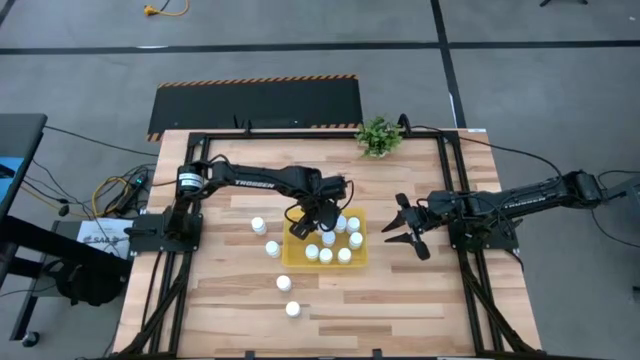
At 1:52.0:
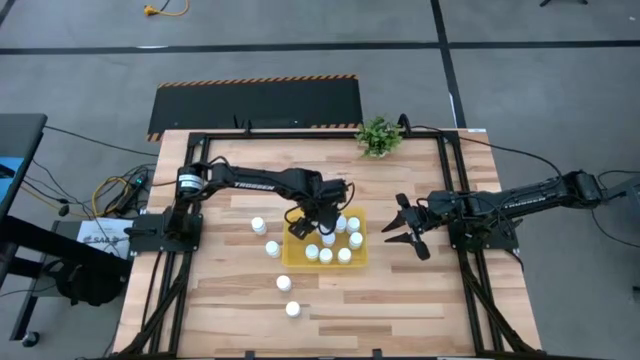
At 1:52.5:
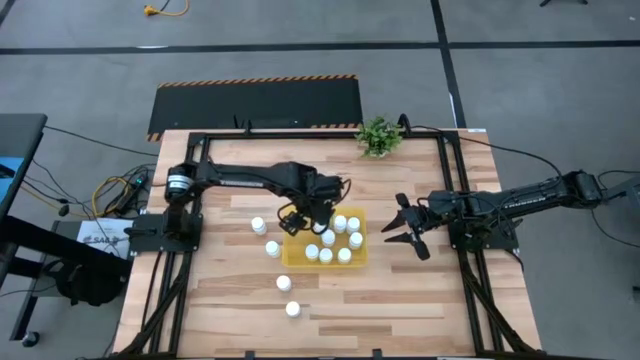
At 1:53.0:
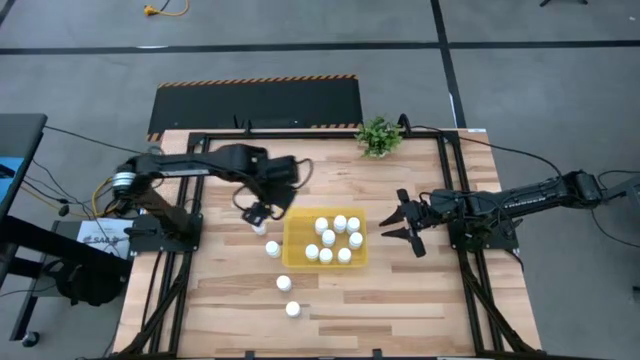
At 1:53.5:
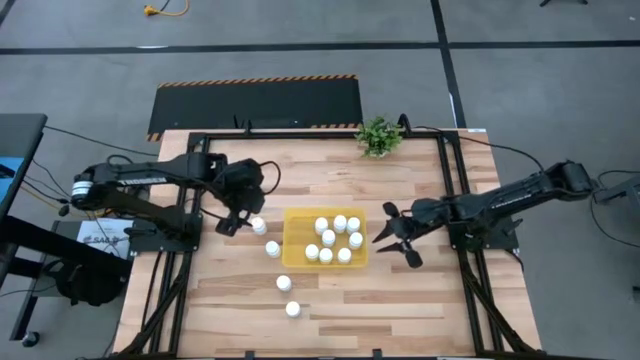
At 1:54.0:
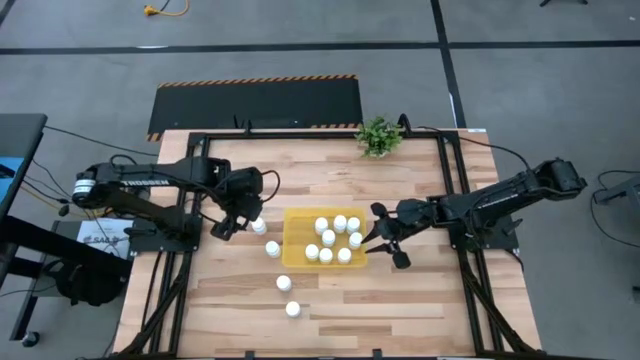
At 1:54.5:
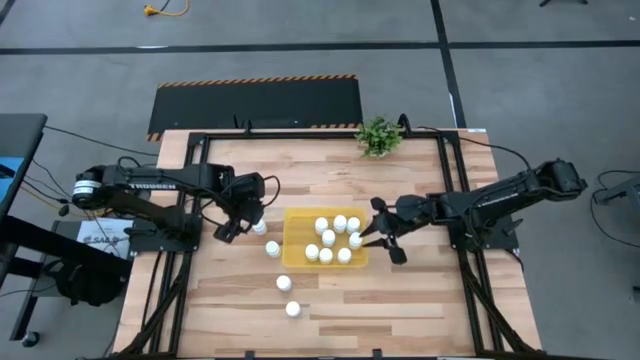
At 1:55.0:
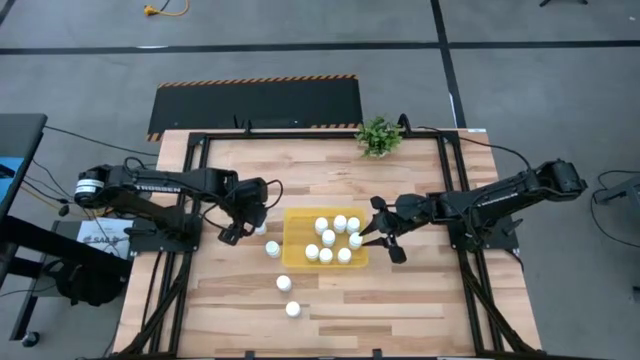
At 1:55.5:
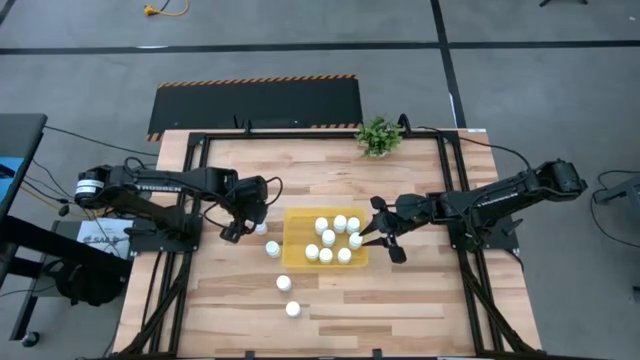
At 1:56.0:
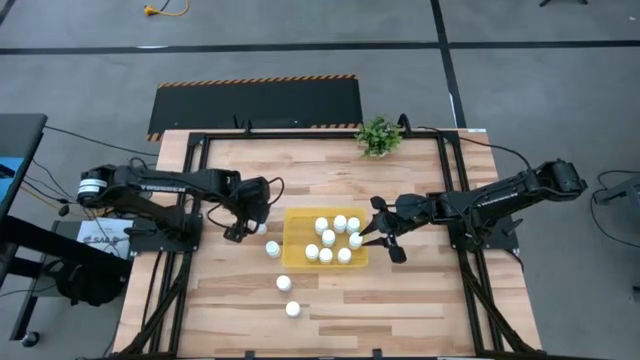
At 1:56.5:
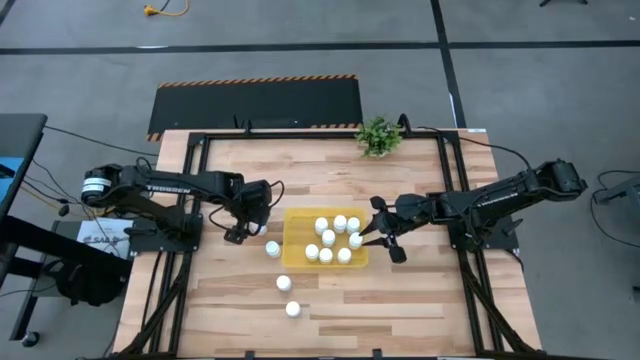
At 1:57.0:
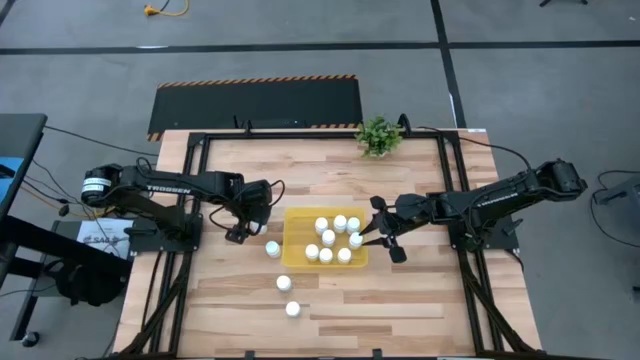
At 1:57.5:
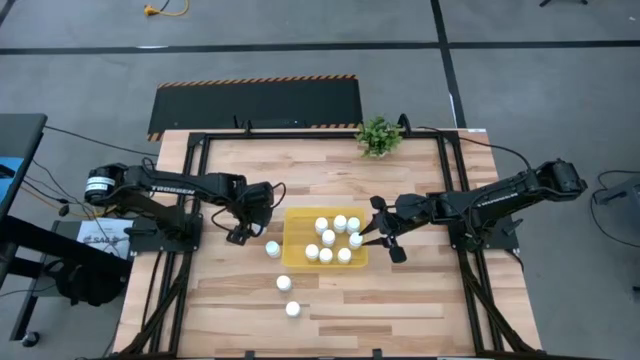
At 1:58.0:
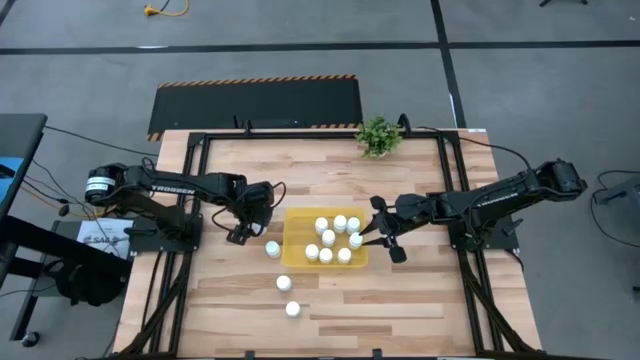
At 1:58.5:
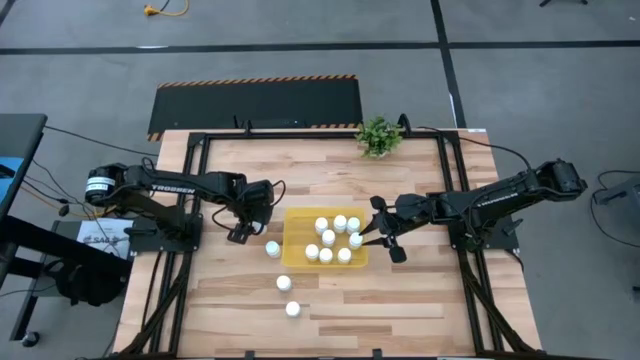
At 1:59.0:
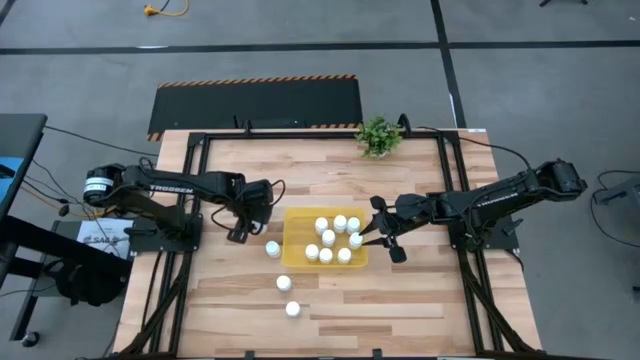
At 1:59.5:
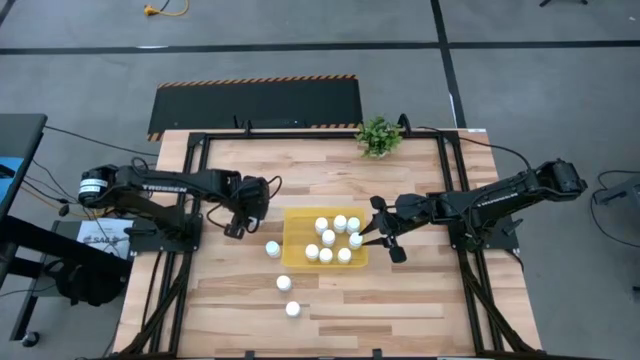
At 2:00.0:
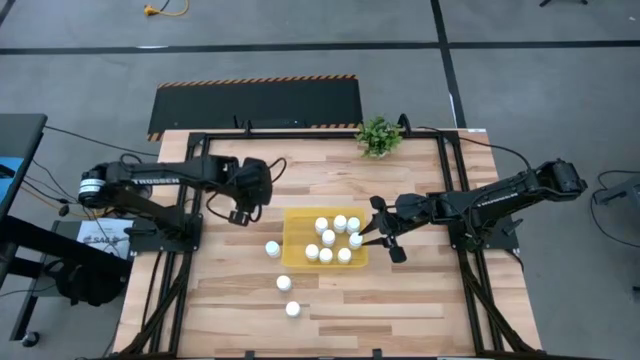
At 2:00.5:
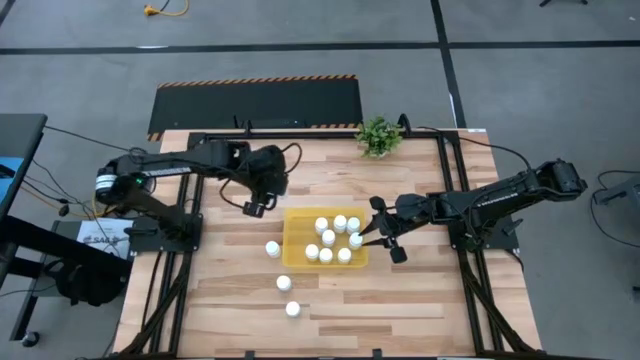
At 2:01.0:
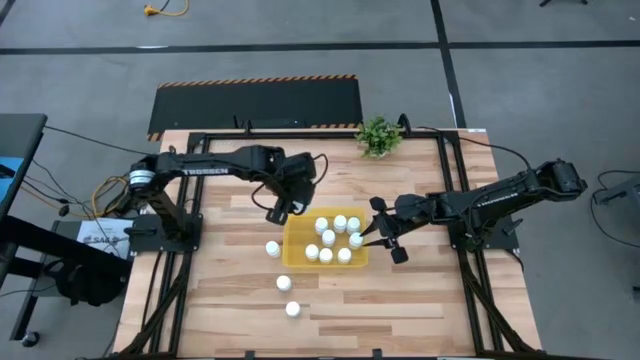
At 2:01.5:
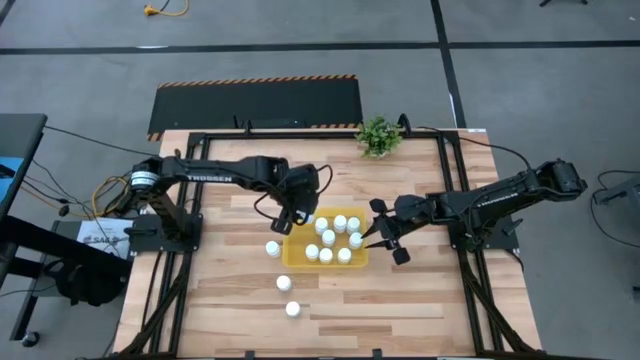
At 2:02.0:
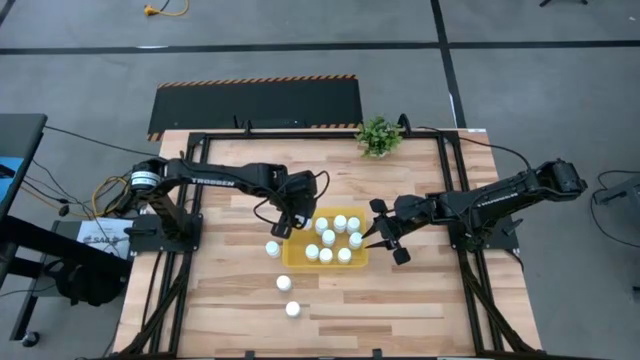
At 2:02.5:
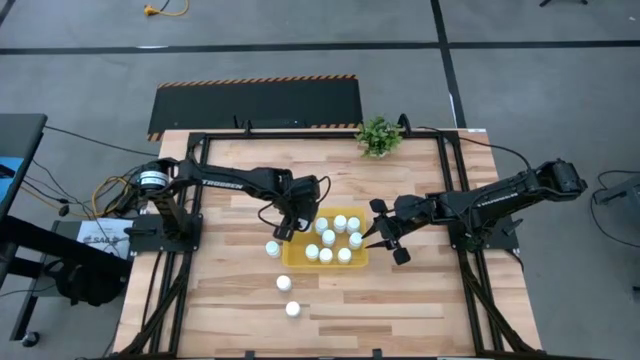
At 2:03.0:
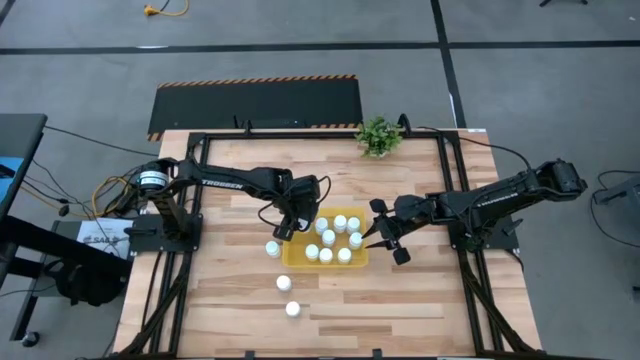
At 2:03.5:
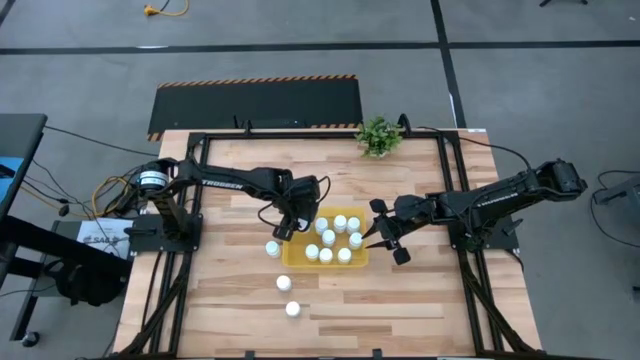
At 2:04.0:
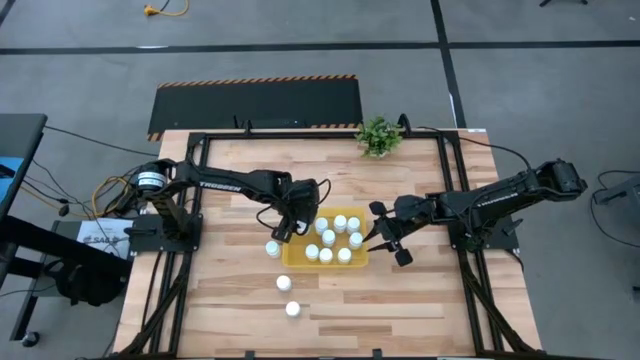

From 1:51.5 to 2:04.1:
Task: Pick and place pill bottles into a basket
Put the white pill bottle into the yellow bin

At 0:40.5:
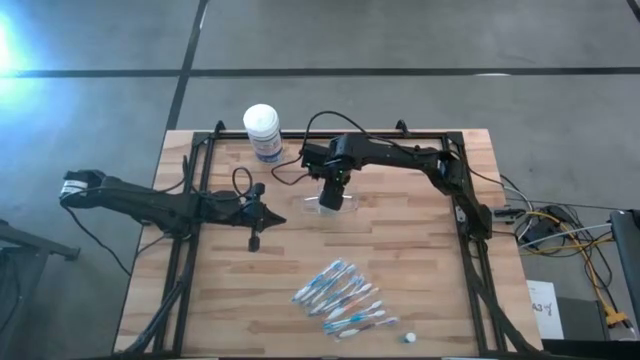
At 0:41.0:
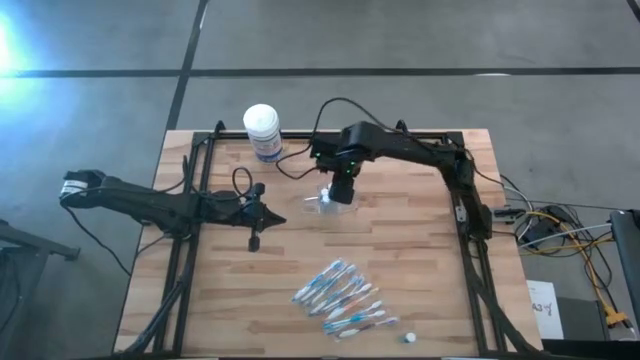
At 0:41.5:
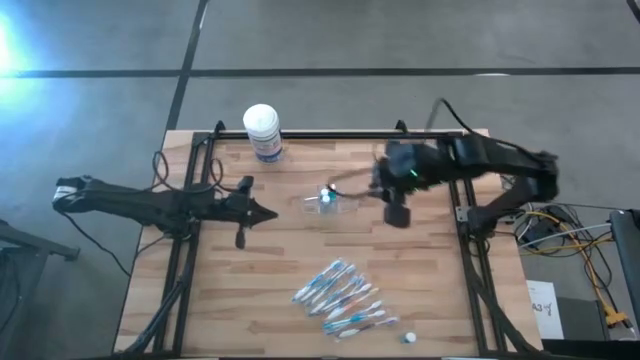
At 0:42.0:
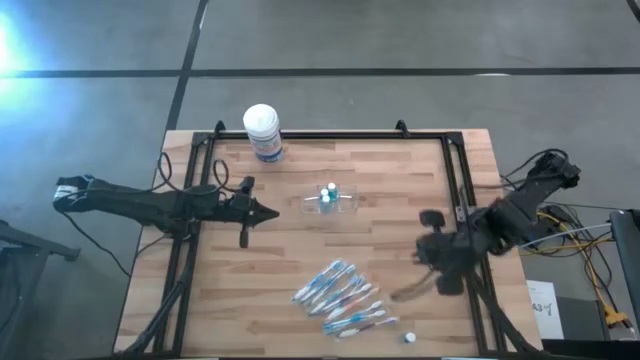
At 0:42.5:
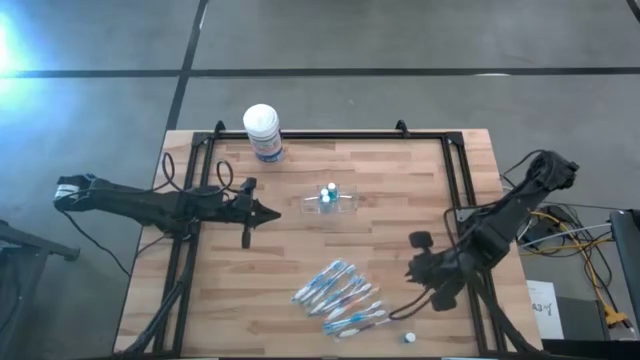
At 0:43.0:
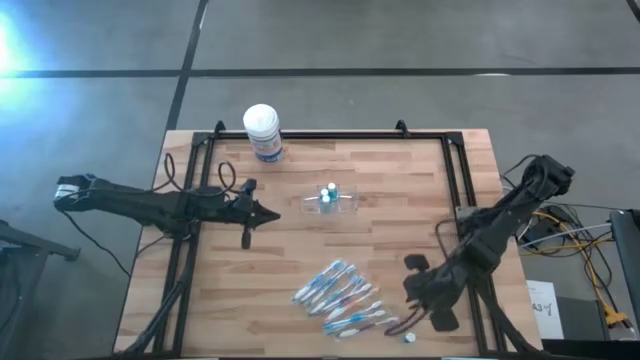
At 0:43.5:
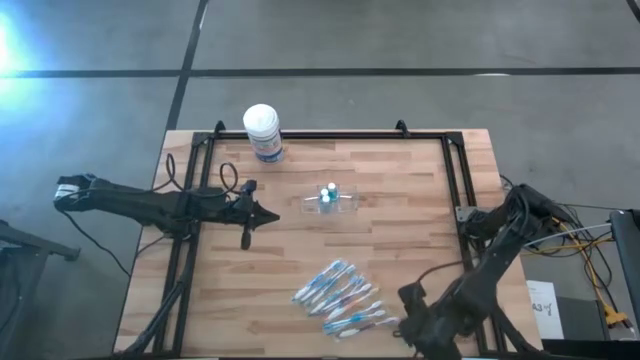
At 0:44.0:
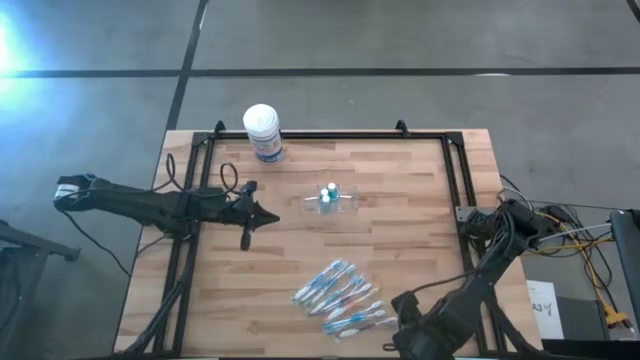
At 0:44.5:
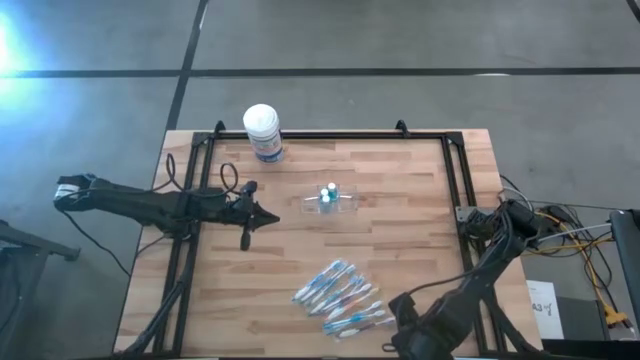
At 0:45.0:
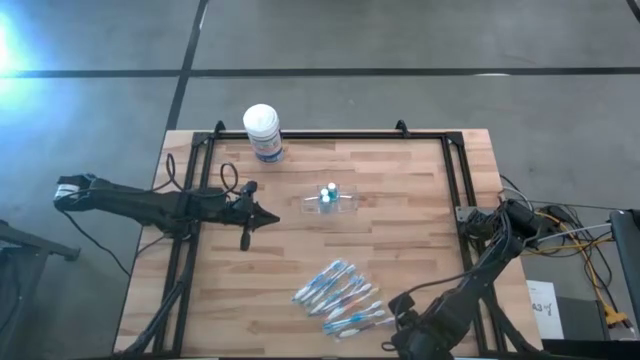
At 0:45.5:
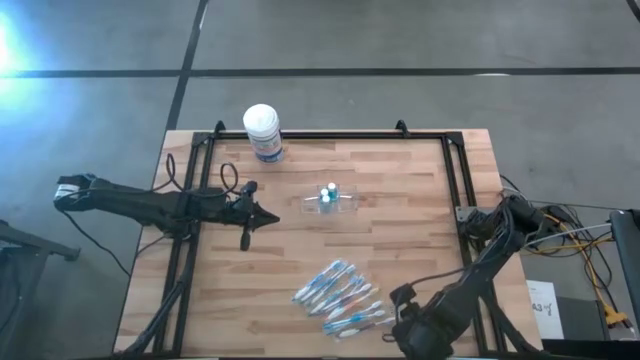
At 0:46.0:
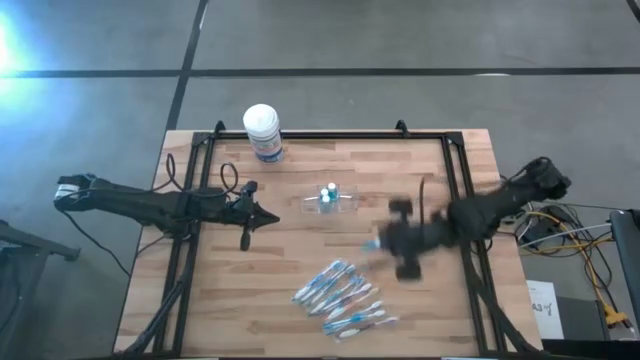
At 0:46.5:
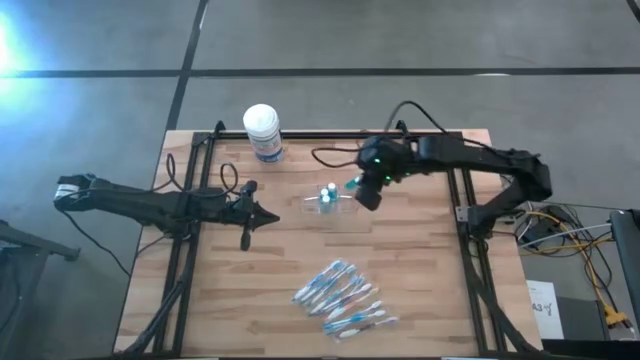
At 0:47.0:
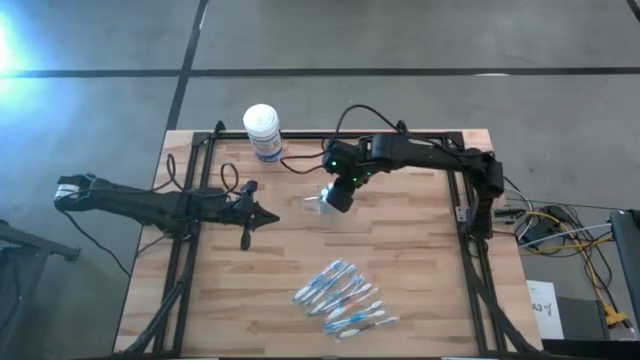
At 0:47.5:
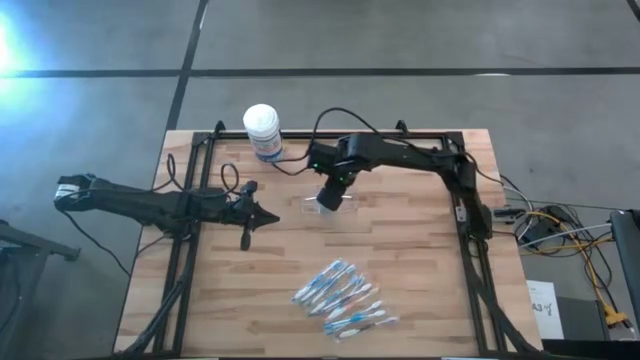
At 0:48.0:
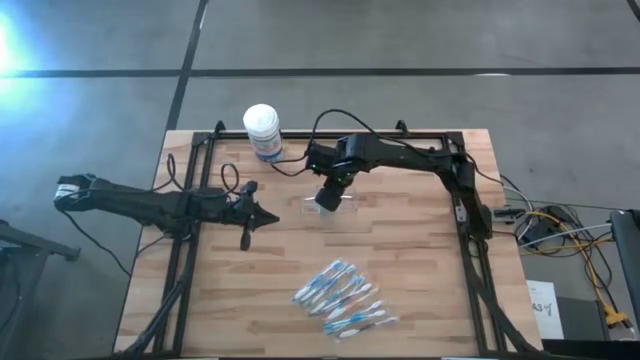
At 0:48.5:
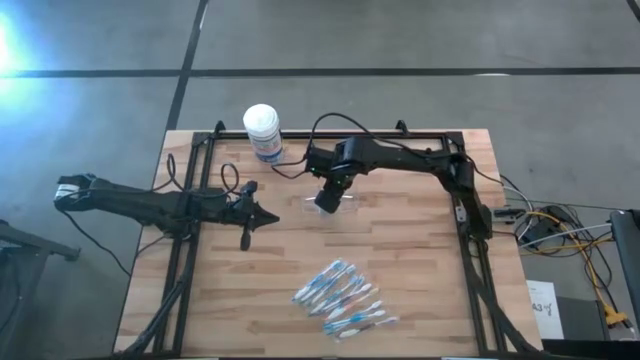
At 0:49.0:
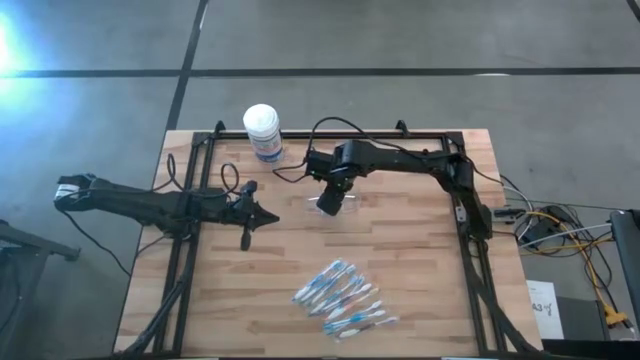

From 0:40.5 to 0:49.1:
Task: Pick & Place toothbrushing station
Put the mouthwash into the transparent organizer
